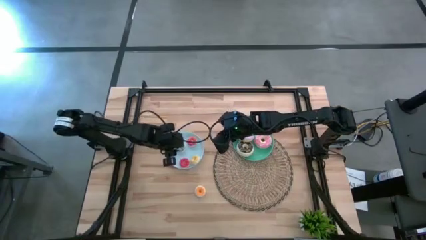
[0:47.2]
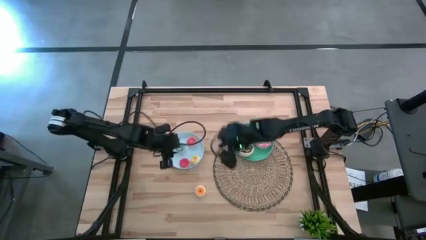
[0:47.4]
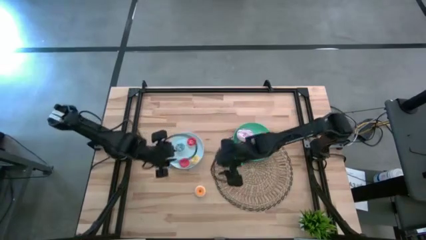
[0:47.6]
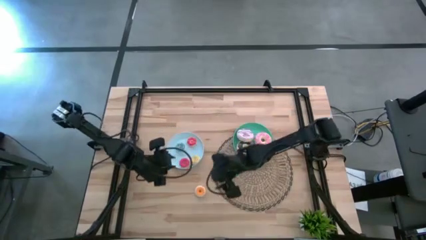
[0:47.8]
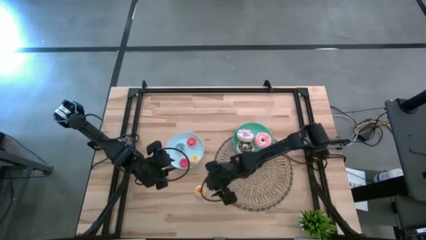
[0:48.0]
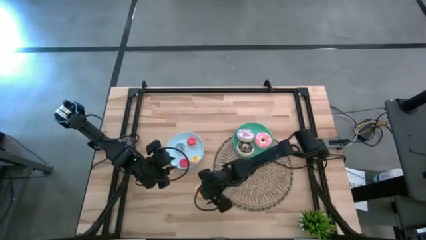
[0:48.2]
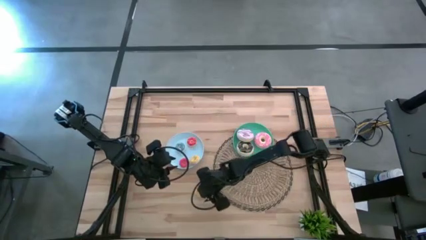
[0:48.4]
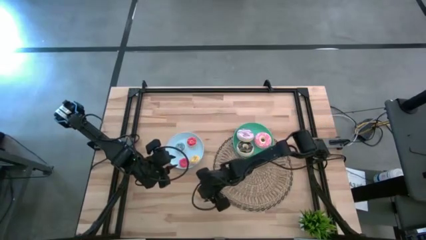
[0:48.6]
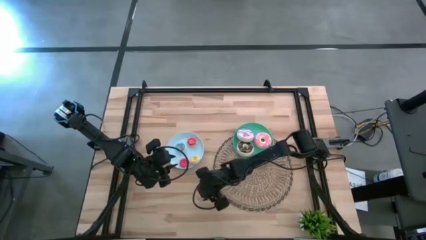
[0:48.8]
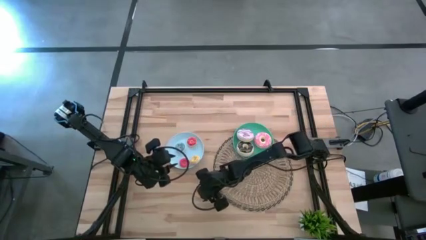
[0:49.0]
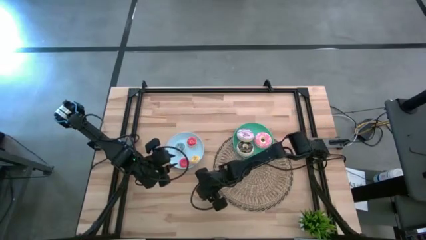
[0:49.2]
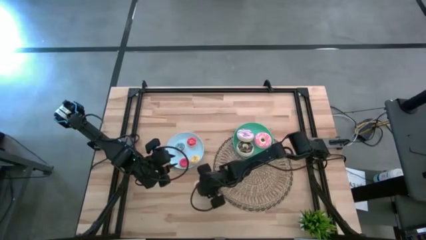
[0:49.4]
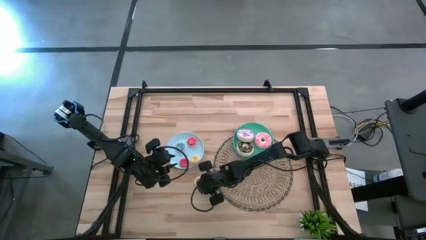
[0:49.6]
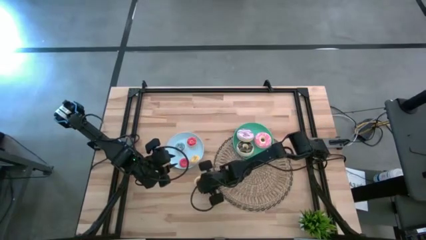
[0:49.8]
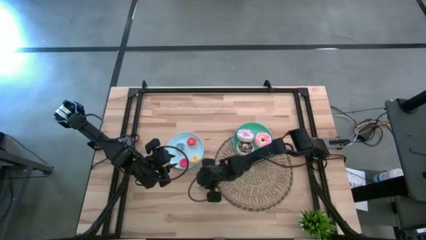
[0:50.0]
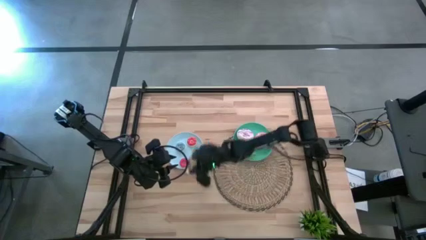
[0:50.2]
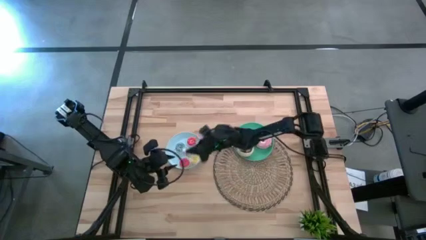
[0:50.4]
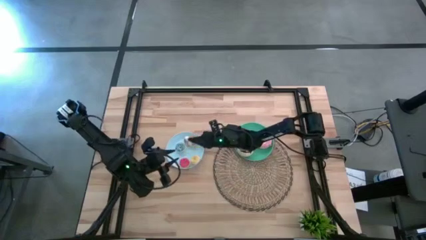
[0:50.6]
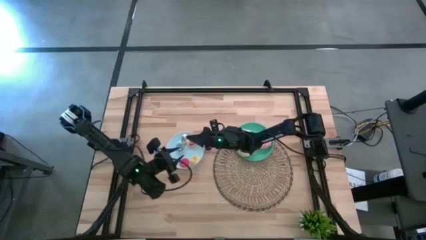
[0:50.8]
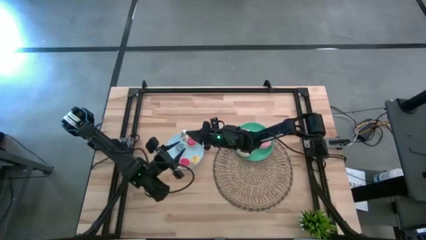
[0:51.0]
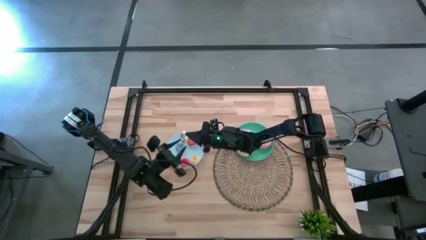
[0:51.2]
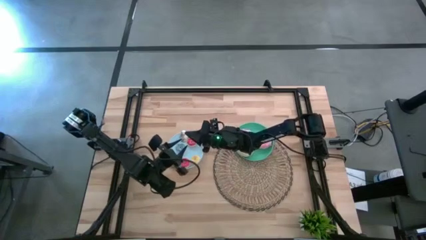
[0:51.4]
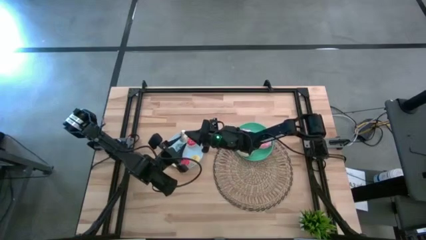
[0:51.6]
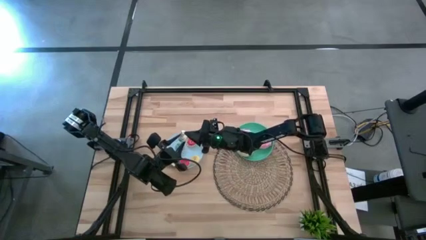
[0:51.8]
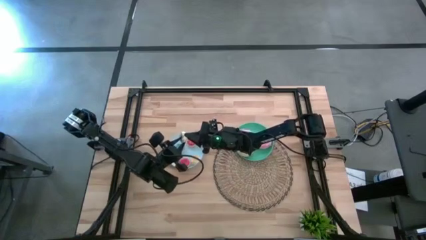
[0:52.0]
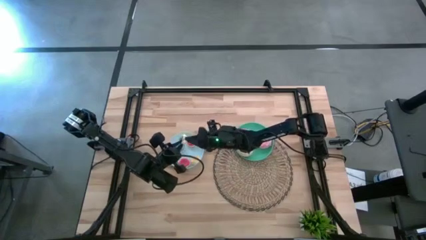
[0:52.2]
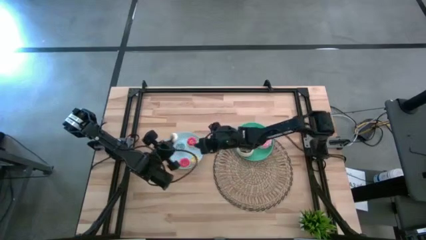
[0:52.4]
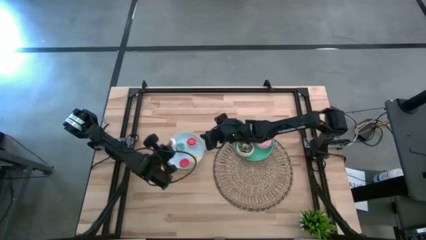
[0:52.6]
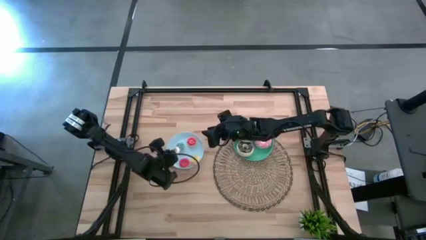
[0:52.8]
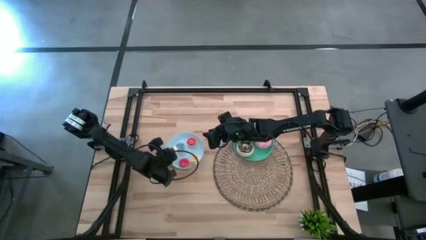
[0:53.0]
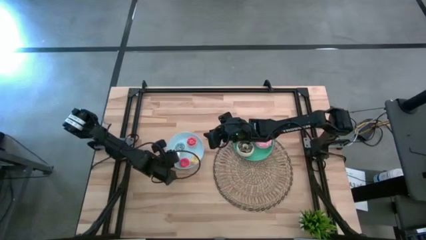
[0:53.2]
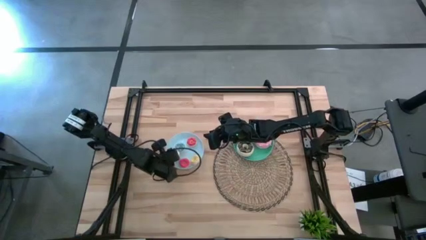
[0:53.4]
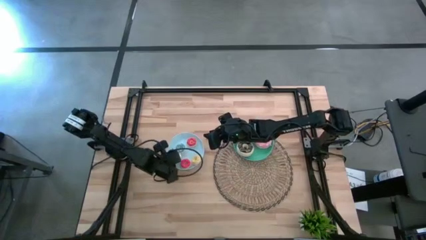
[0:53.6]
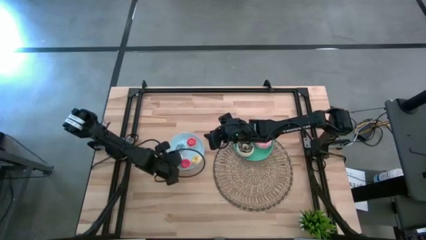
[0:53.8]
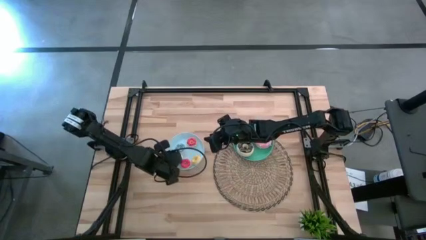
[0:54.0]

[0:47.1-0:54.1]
Task: Pick & Place donuts
Put the white doughnut on the blue plate

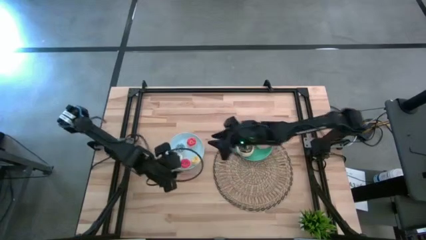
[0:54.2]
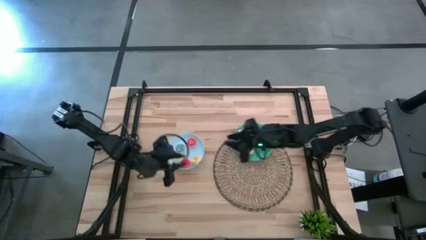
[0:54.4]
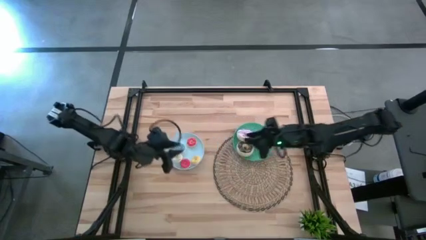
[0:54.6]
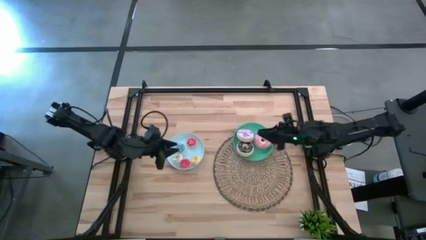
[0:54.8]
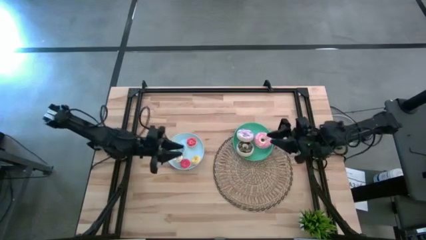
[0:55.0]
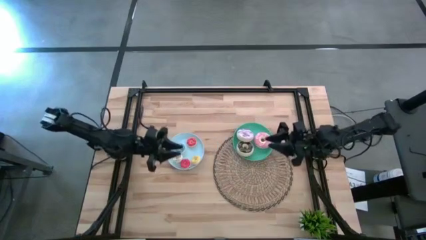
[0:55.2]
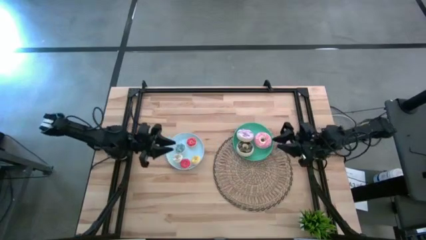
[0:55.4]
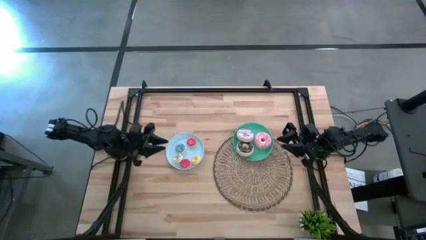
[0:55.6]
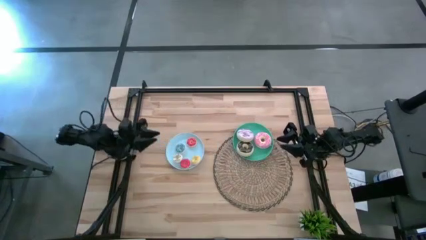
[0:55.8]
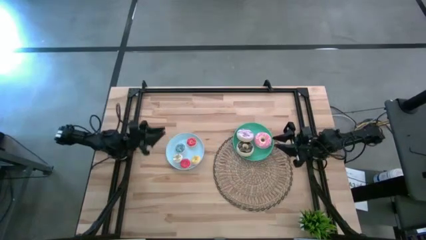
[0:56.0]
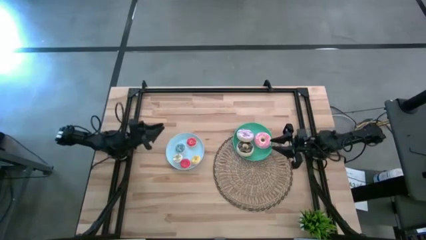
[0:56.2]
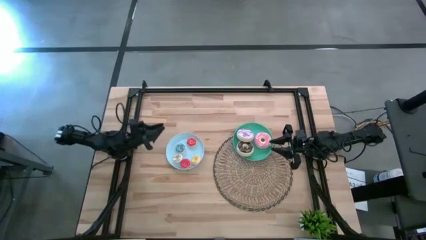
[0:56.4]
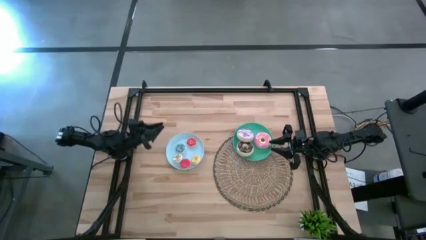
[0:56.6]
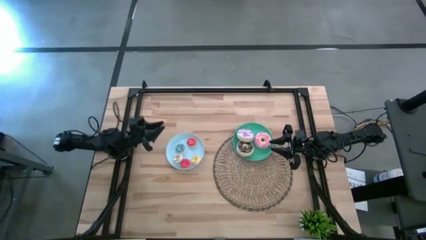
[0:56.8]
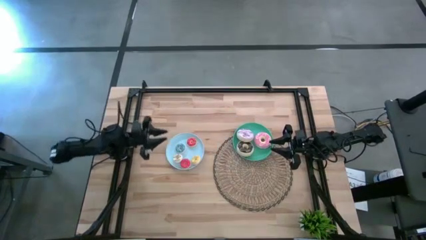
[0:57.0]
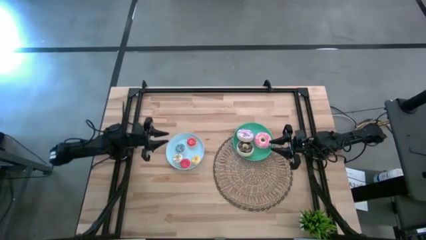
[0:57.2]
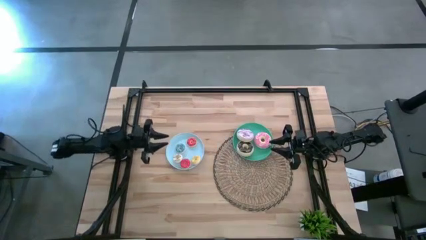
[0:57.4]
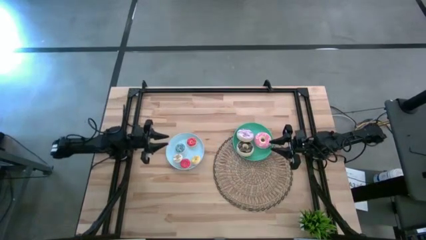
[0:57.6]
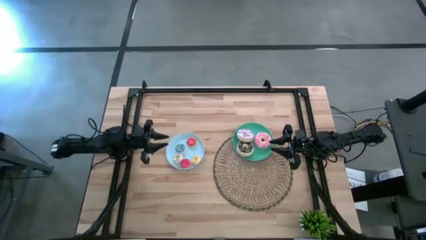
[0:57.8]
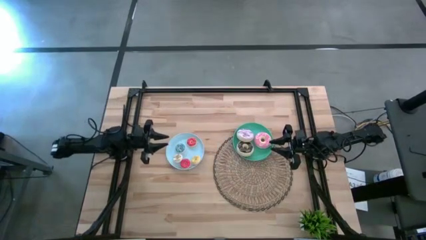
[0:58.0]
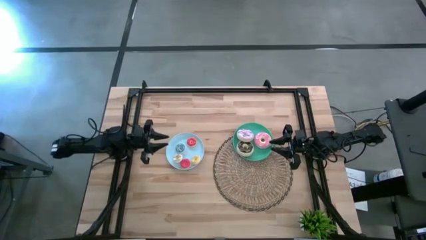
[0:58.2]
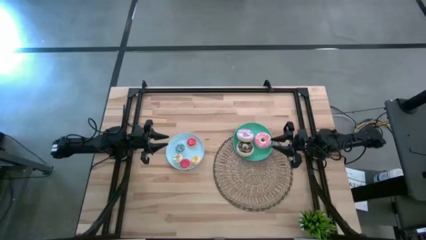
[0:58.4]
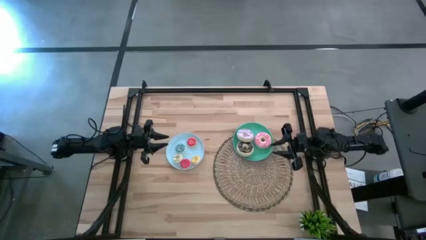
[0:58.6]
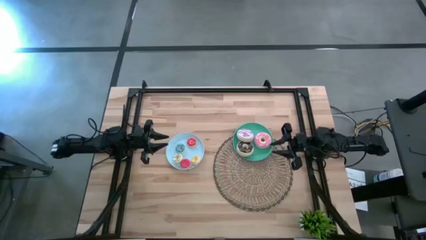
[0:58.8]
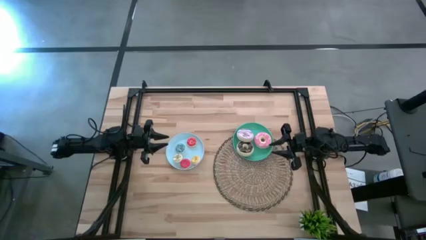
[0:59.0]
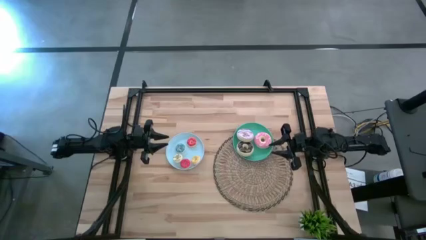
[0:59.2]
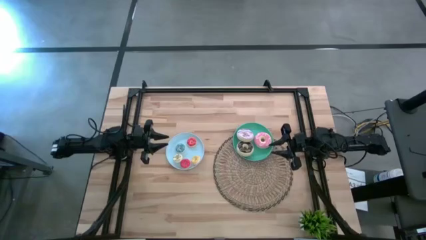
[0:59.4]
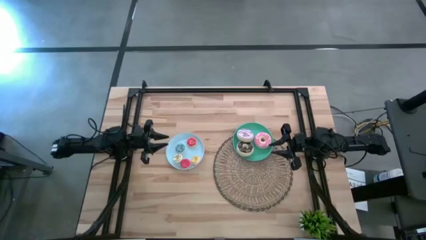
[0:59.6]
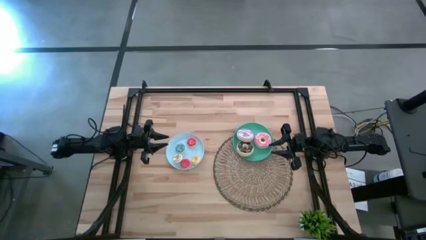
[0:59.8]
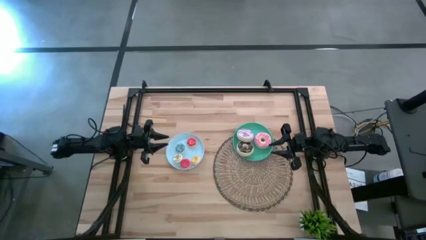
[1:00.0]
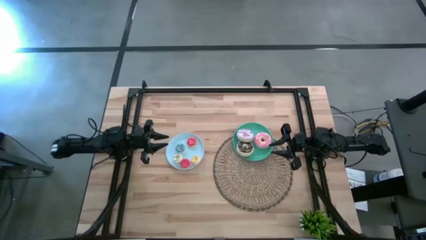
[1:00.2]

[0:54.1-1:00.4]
Return to Home Position

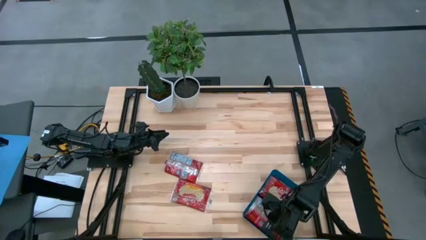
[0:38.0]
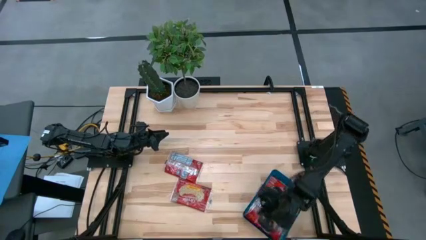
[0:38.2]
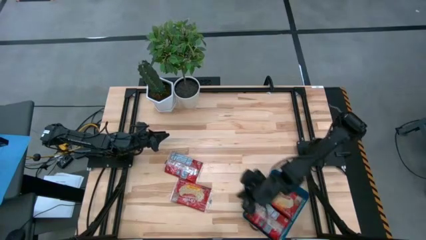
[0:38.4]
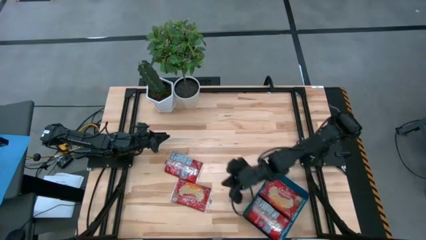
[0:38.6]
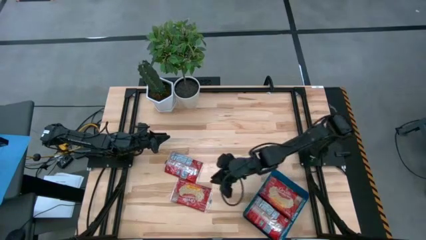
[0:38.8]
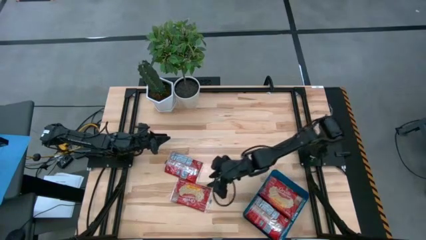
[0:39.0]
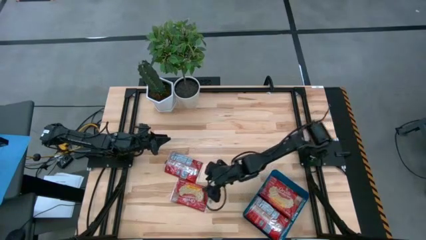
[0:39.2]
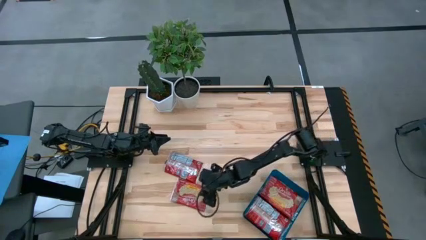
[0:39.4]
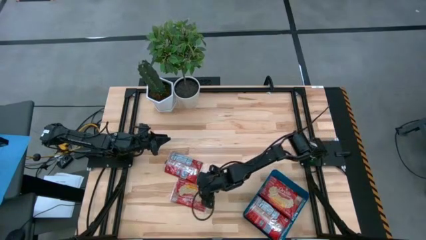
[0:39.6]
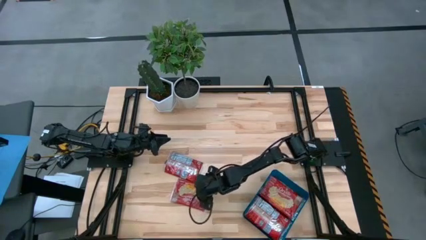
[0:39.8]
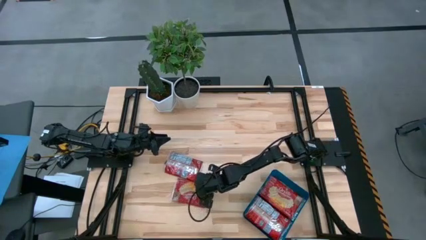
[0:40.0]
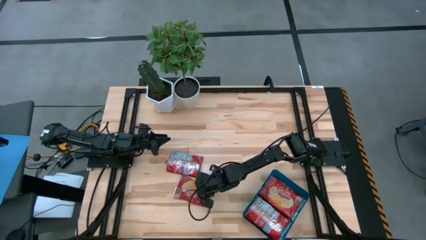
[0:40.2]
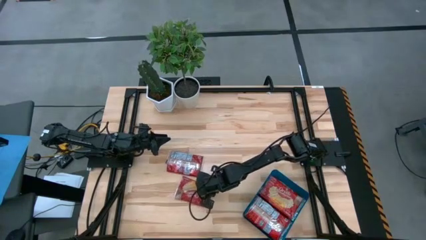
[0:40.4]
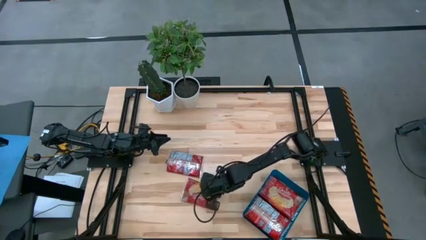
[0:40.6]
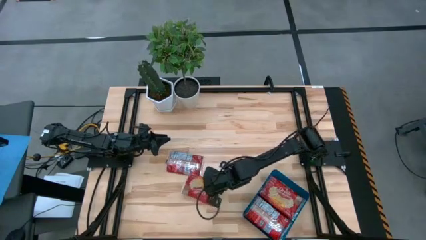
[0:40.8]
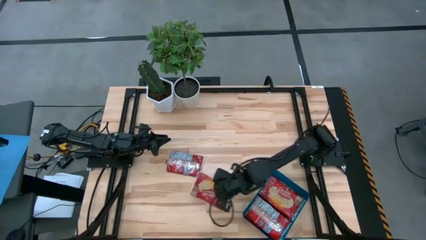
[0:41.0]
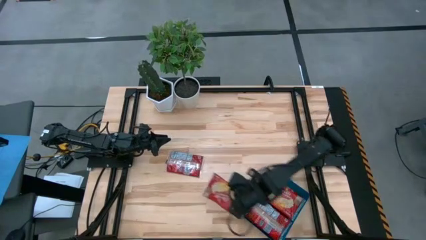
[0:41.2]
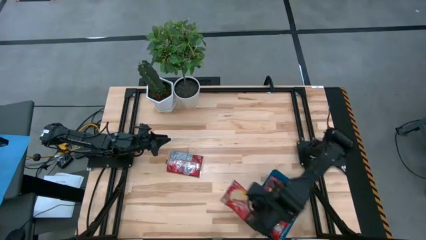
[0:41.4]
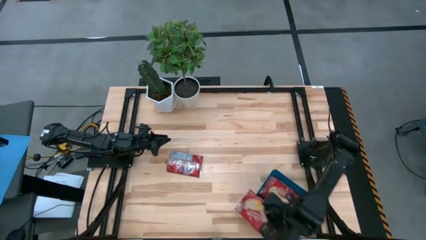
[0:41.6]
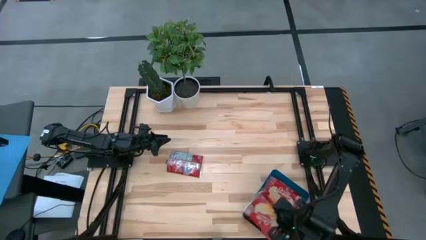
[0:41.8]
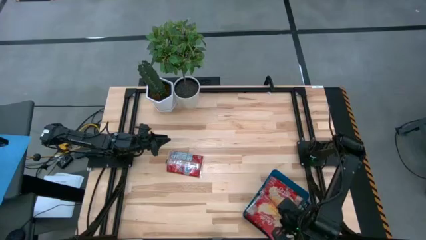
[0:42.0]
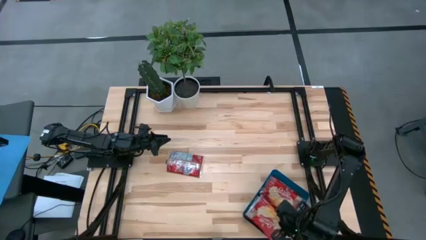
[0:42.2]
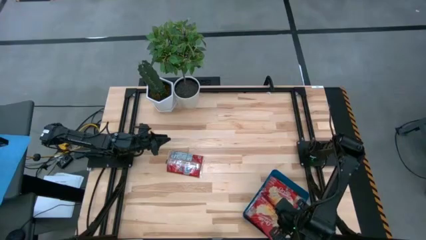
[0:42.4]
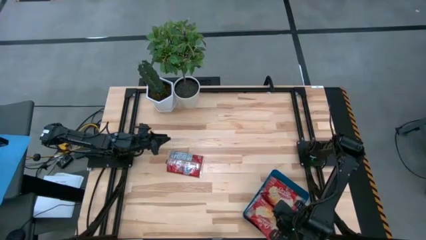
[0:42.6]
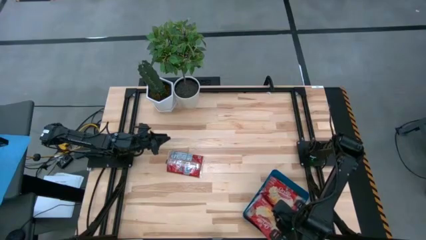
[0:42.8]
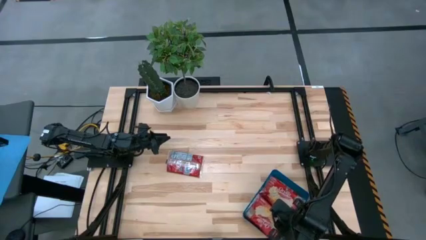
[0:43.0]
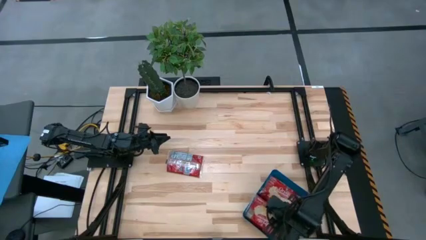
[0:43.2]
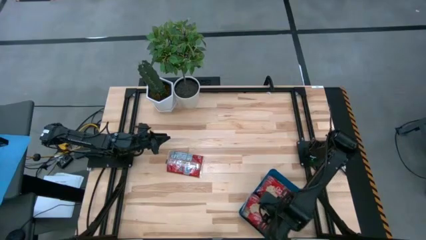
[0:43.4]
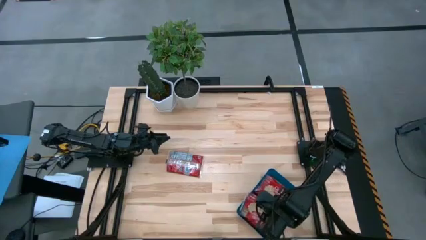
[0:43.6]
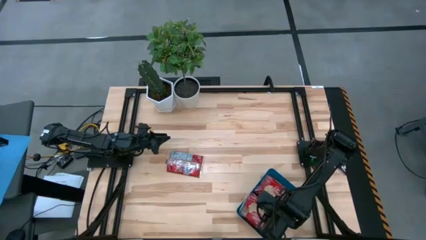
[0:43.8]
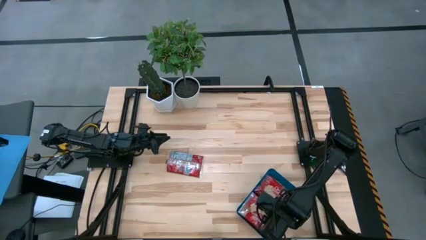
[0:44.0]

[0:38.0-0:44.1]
Task: Sort popcorn bags into baskets
Put the red popcorn bag into the blue bin
